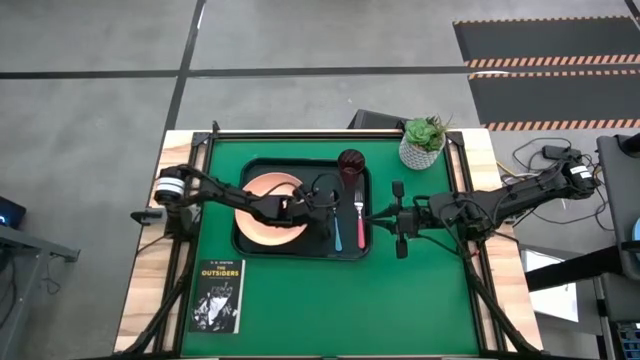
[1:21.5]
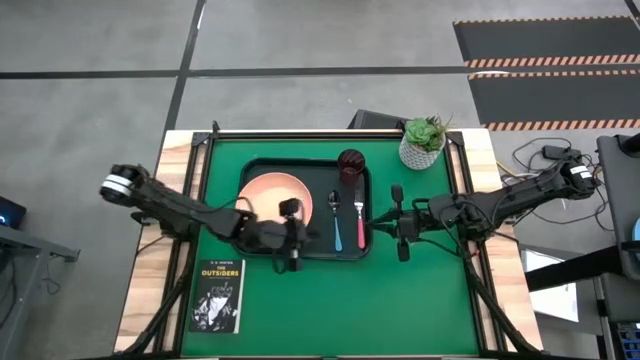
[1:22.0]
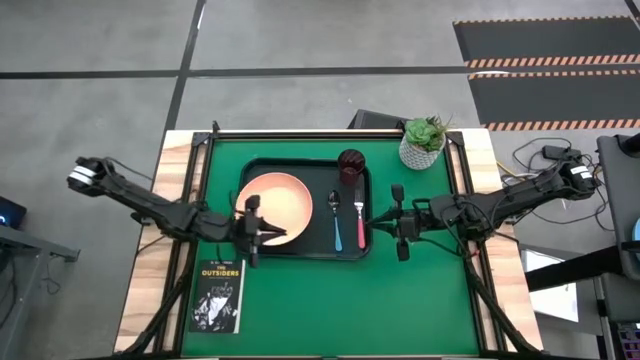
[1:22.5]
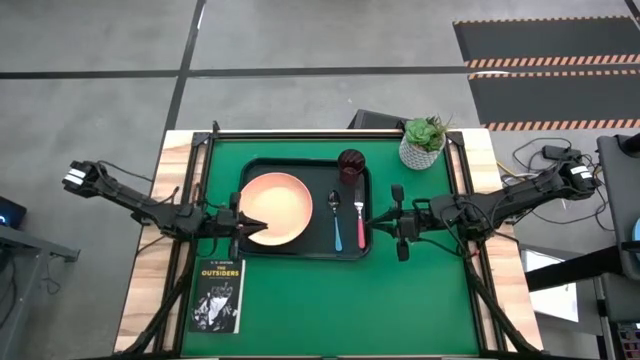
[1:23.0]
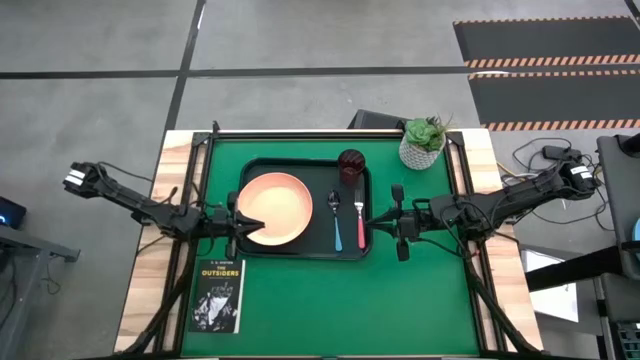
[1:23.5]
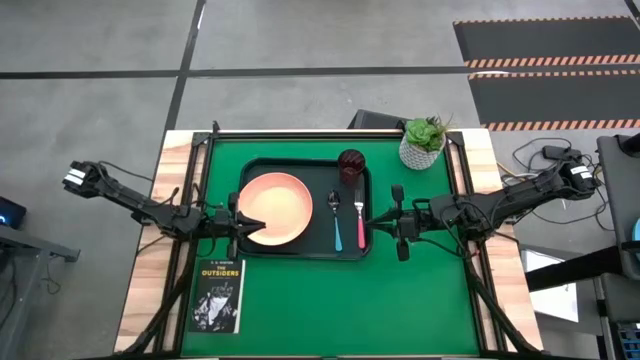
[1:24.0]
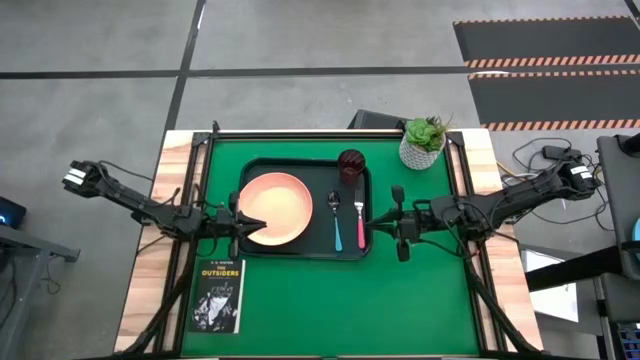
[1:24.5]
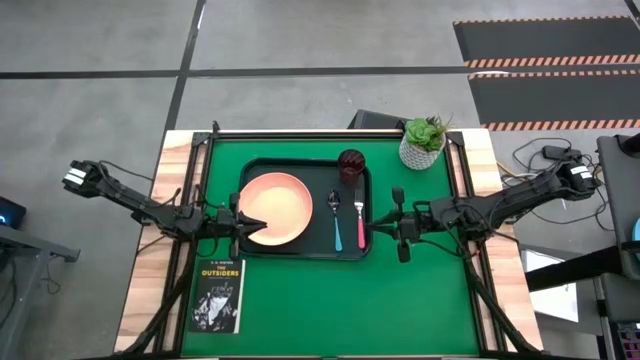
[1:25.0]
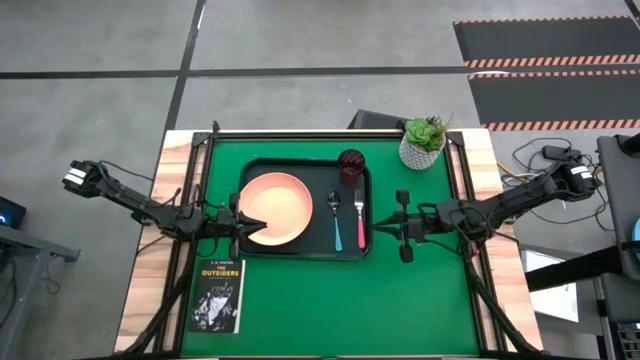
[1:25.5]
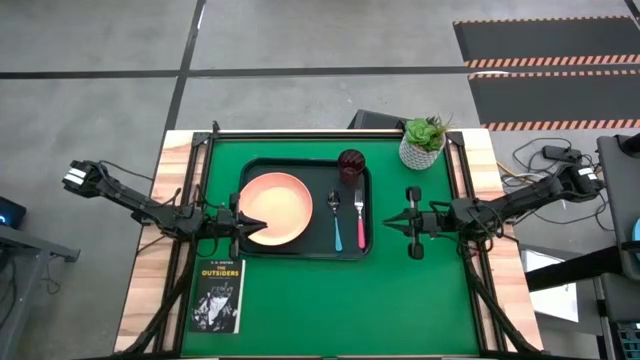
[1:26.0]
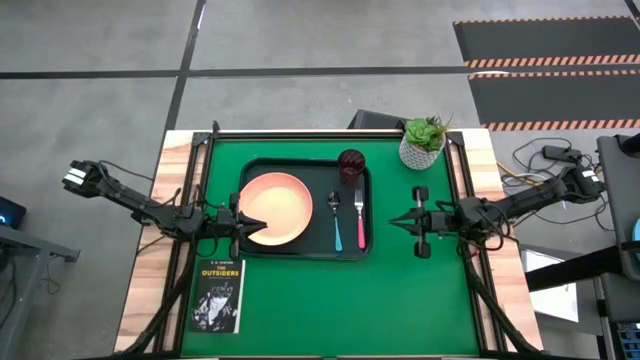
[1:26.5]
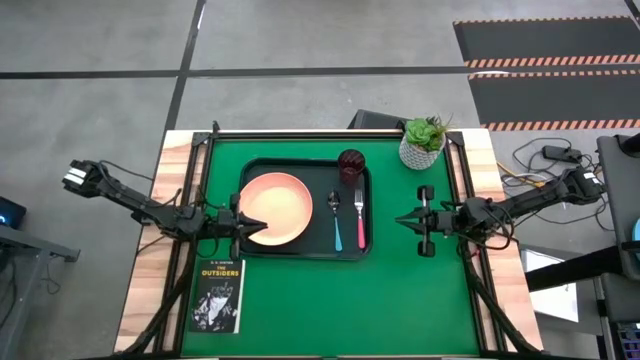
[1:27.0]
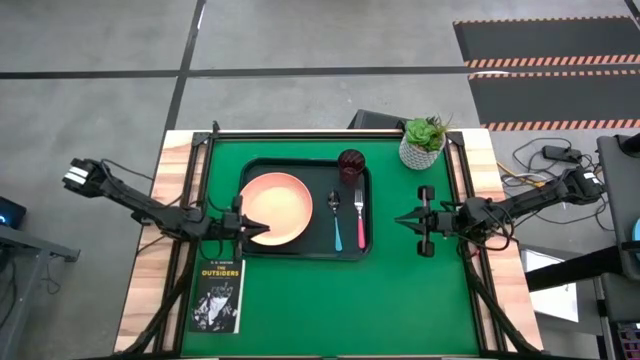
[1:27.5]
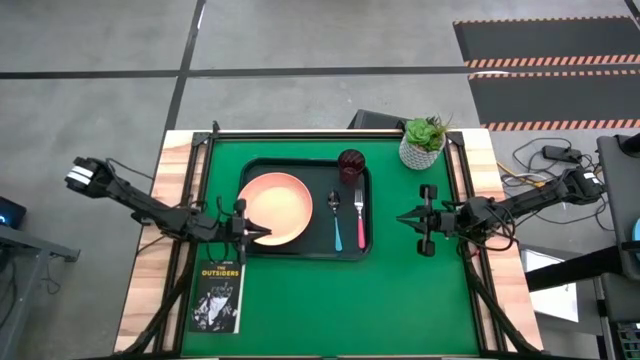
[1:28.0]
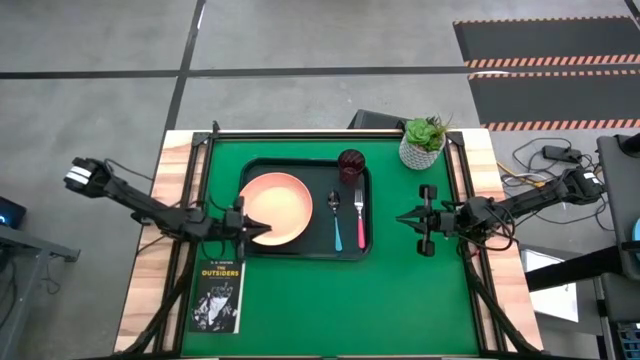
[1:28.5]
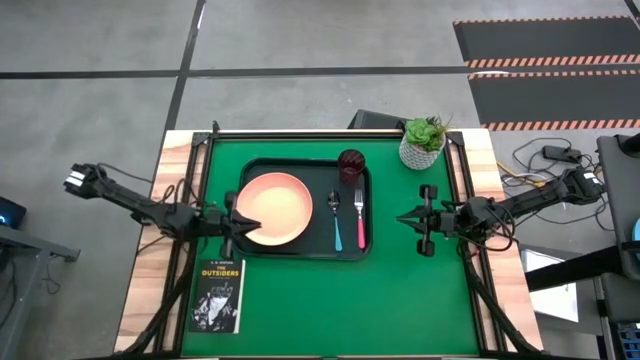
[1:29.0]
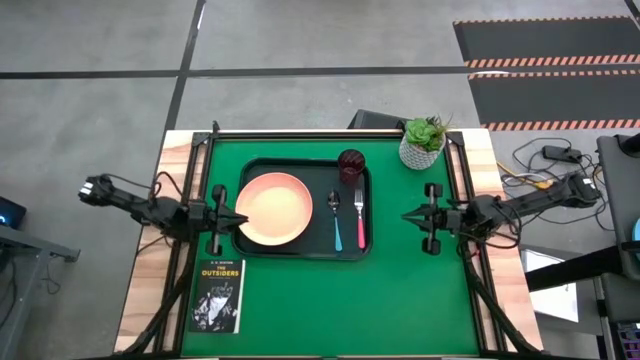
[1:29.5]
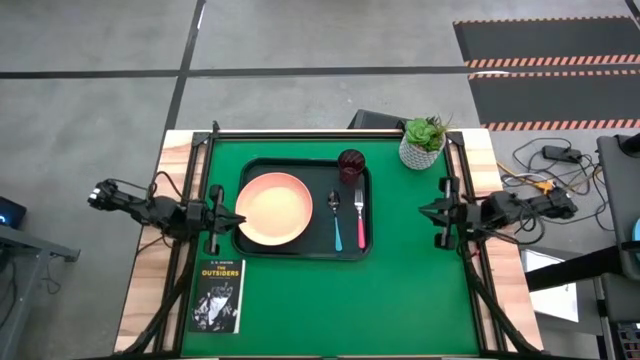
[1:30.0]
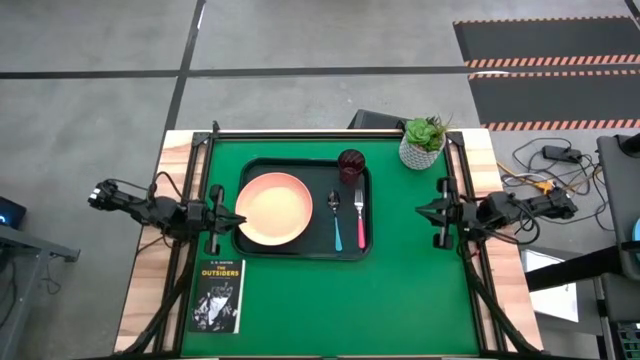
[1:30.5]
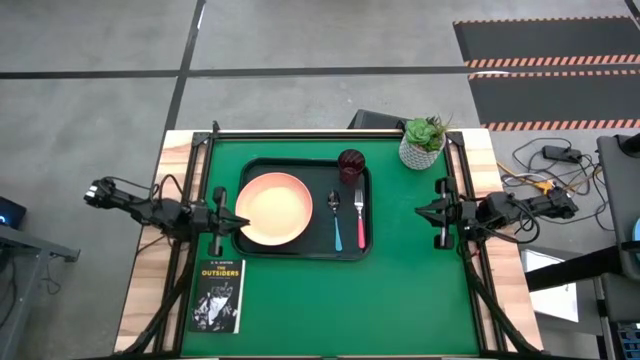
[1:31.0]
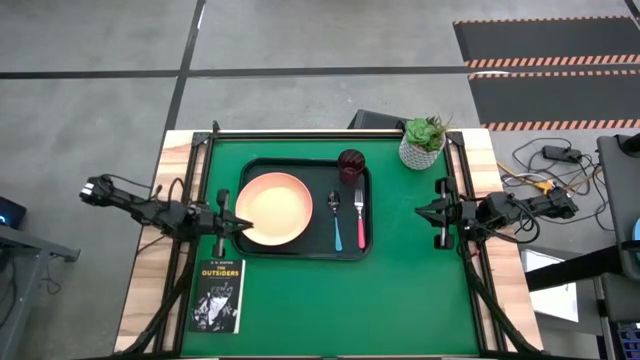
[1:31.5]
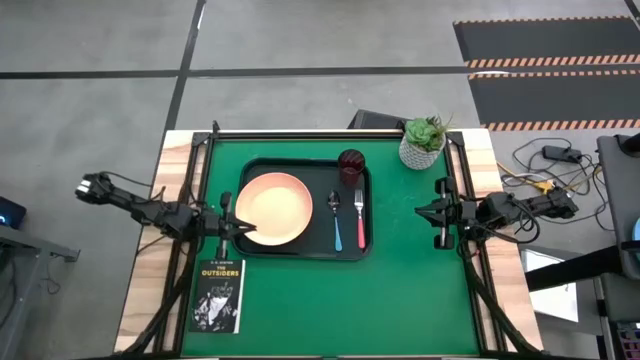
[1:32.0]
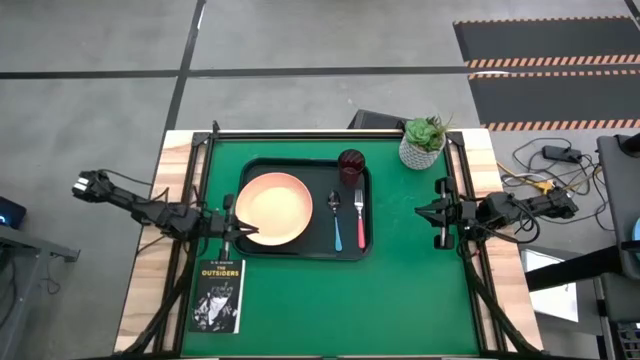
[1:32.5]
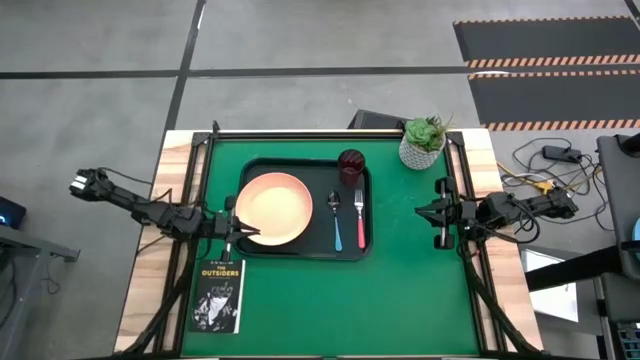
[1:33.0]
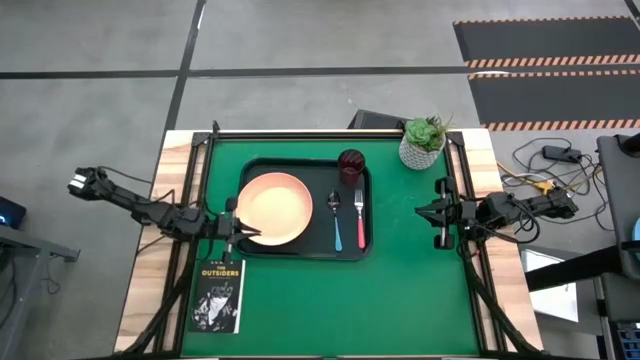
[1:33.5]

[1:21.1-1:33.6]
Task: Pick and place plate/cup/fork/spoon on tray
Return to Home Position

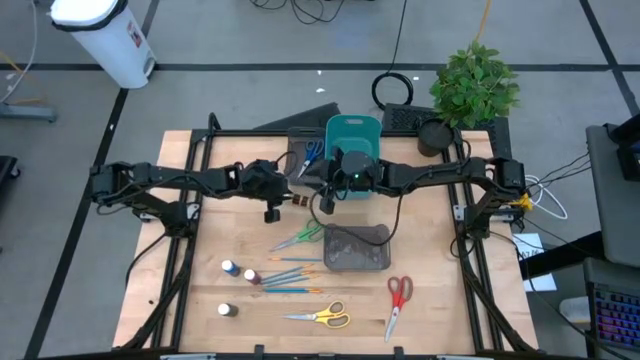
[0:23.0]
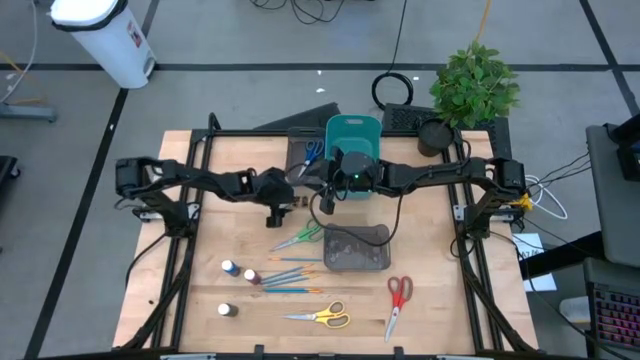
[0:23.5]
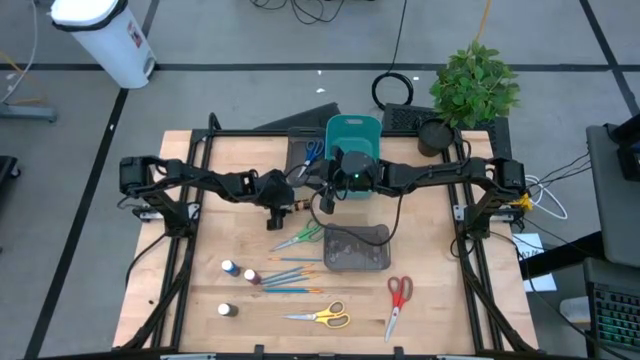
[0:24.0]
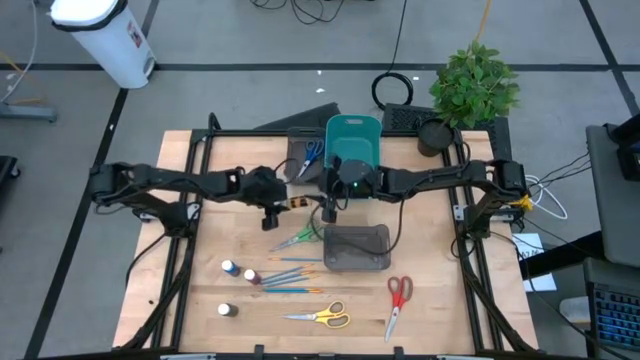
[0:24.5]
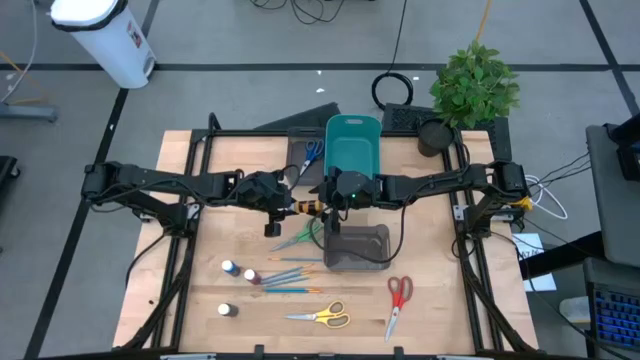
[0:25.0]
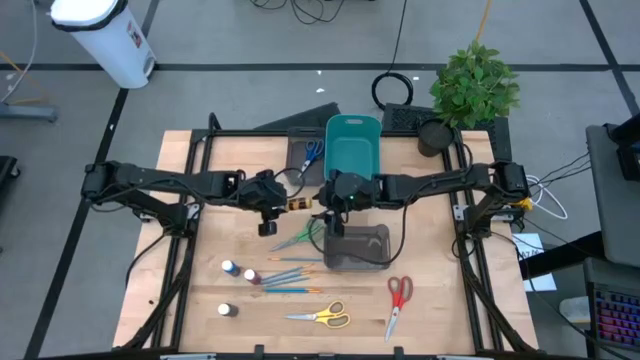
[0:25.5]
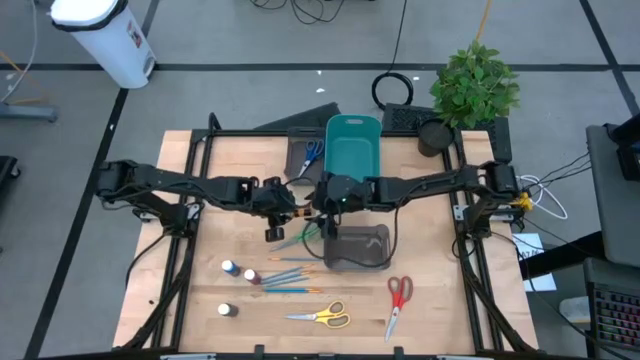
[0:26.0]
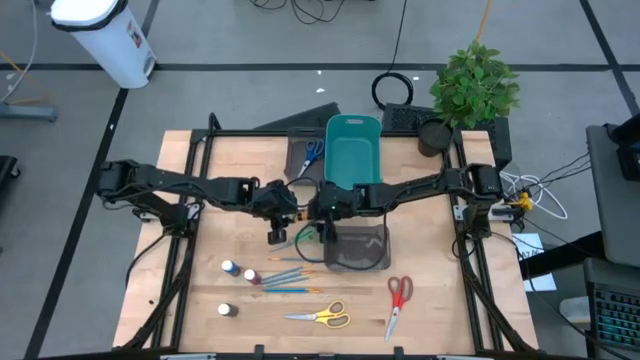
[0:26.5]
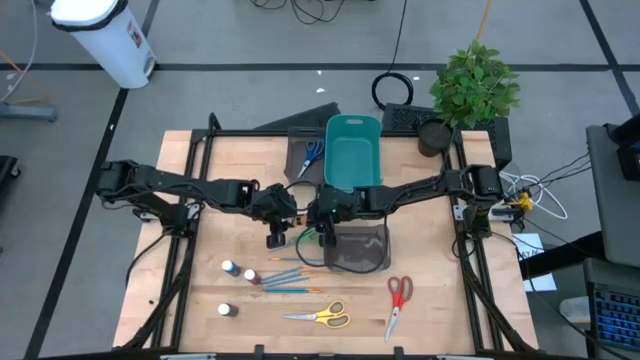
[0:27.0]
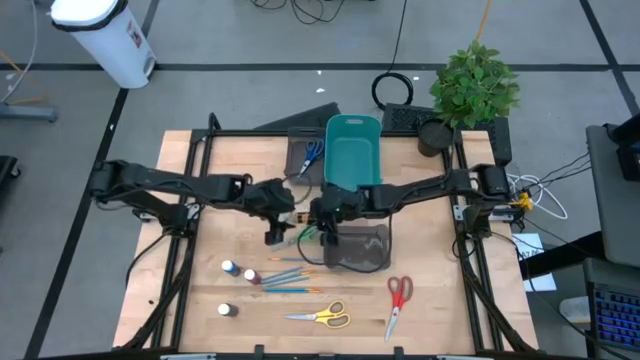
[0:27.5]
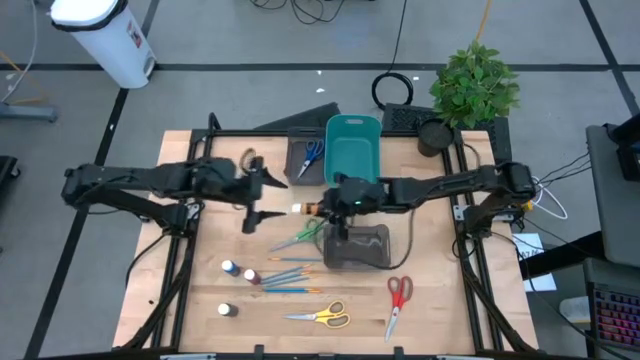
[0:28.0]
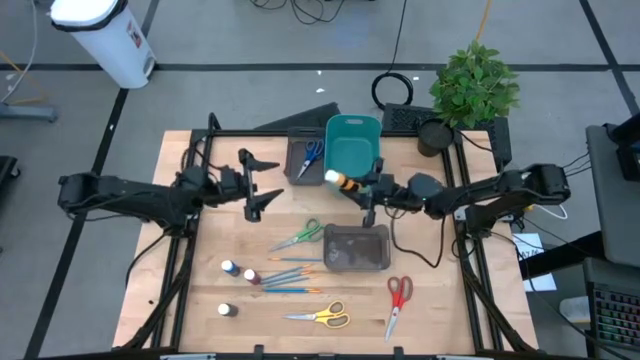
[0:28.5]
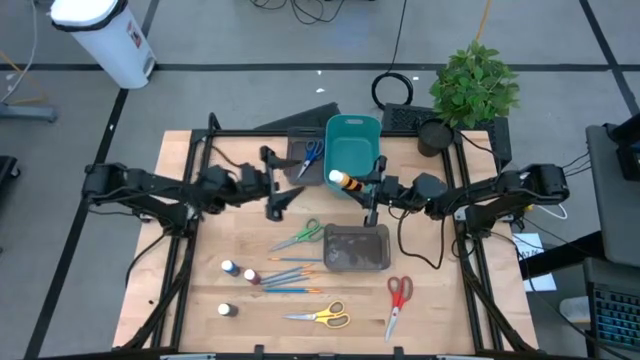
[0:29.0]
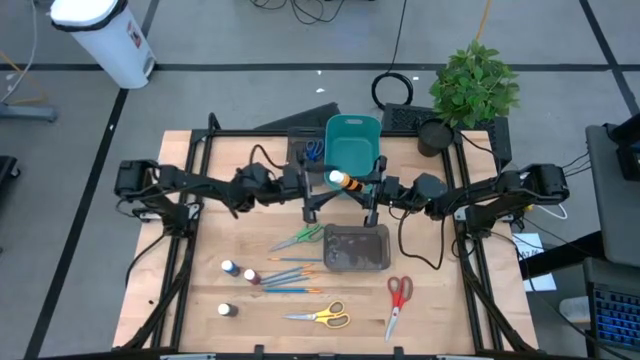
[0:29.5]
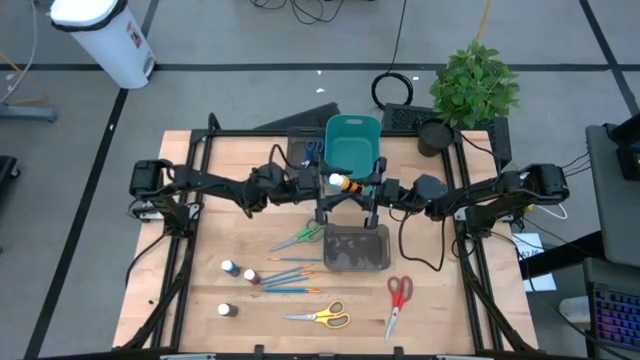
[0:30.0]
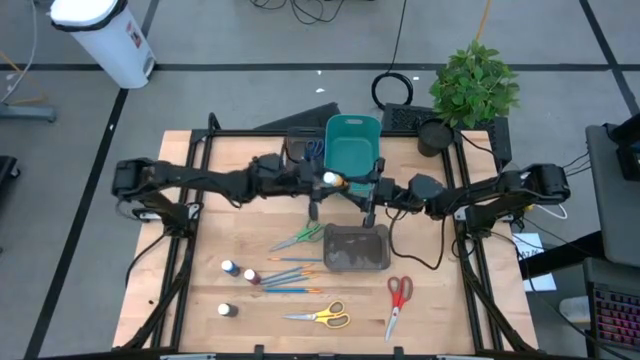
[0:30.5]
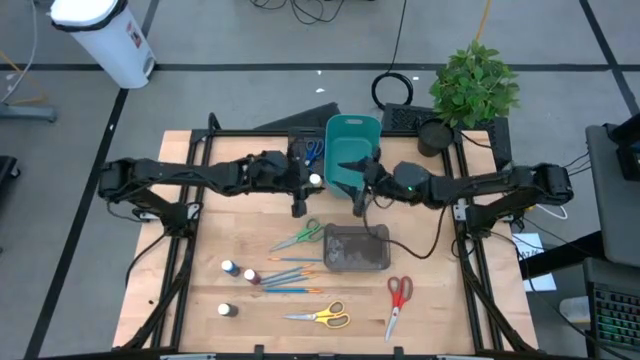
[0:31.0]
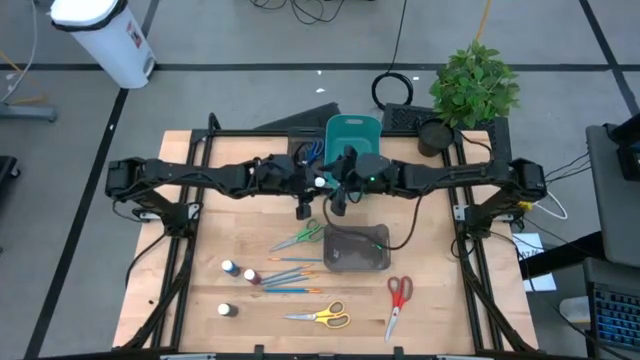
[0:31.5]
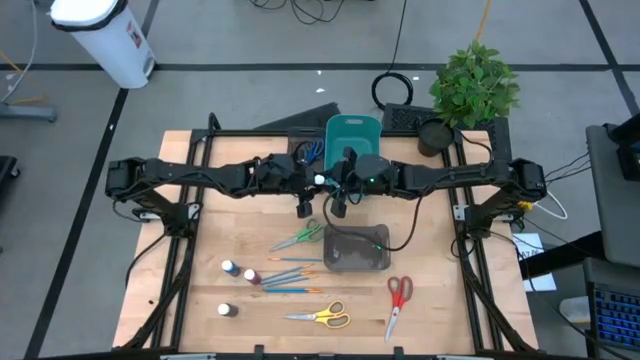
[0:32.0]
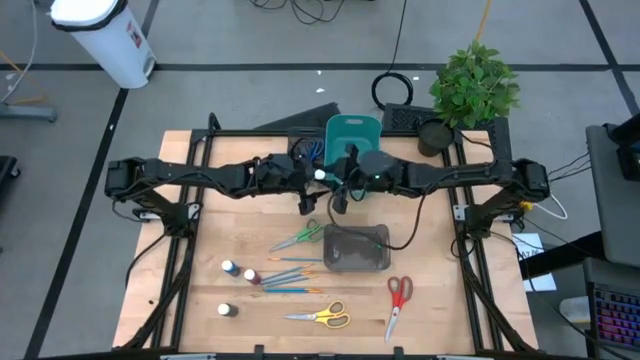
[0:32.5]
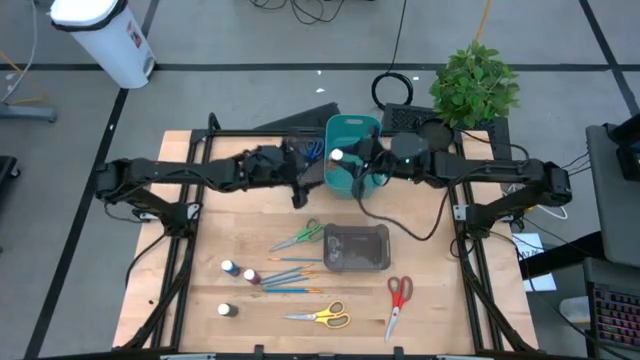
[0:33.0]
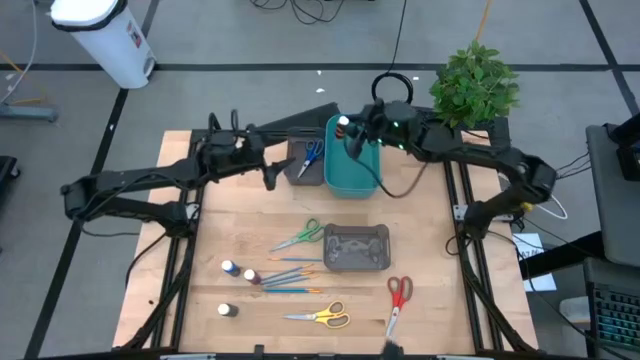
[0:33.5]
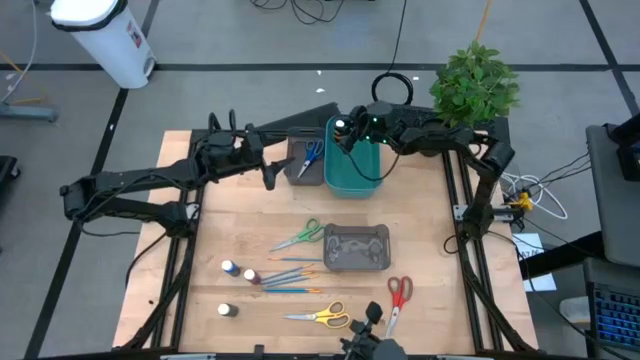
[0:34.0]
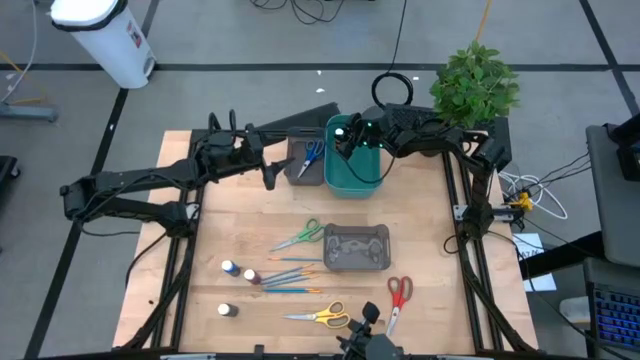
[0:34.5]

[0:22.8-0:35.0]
Task: Pick & Place Paint Supplies
Put the yellow paint bottle into the green bin
